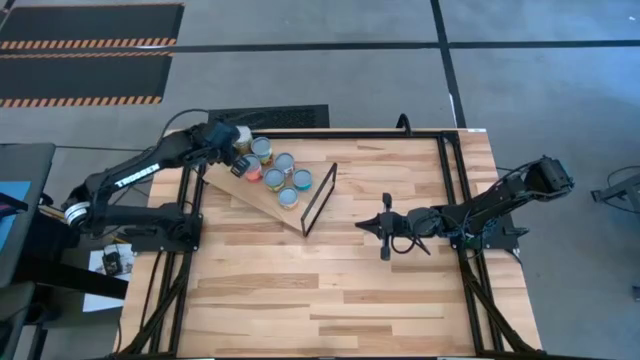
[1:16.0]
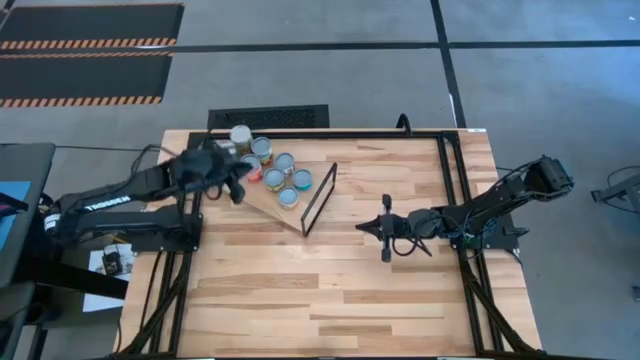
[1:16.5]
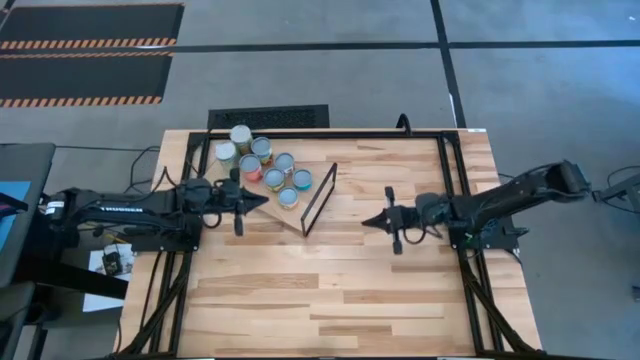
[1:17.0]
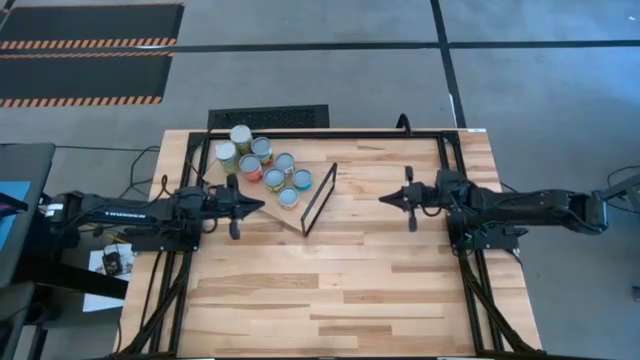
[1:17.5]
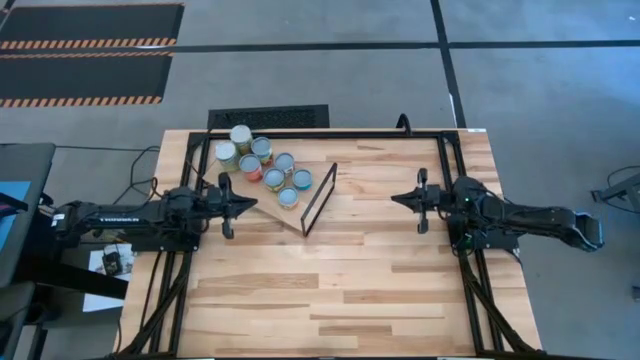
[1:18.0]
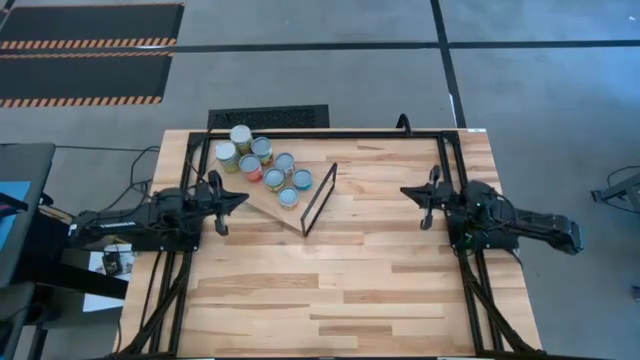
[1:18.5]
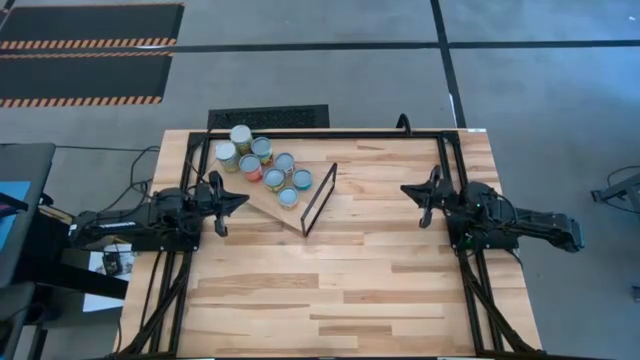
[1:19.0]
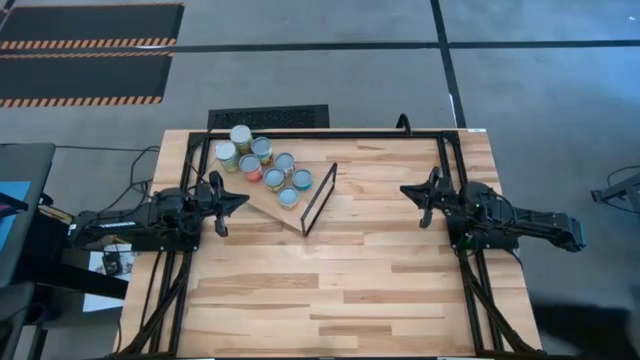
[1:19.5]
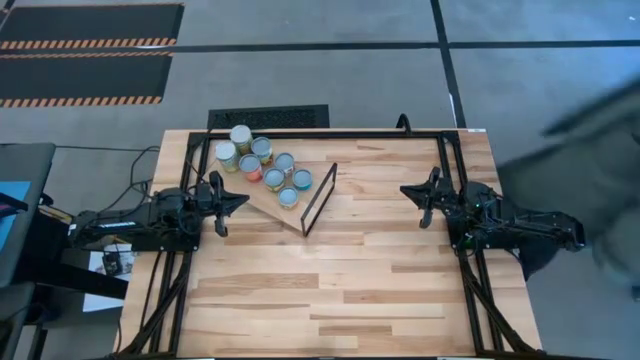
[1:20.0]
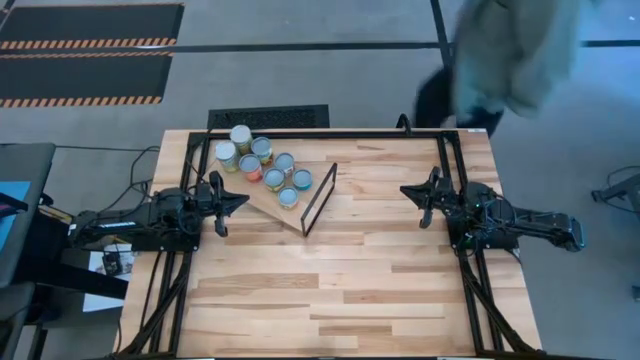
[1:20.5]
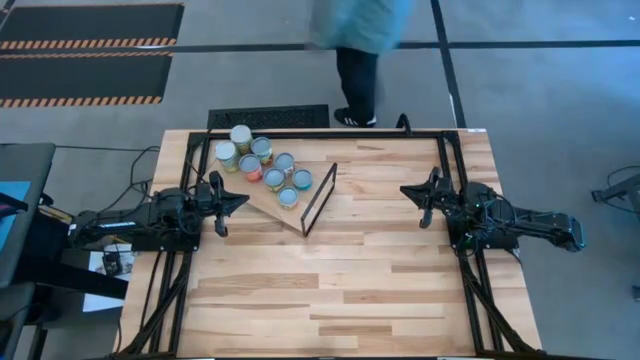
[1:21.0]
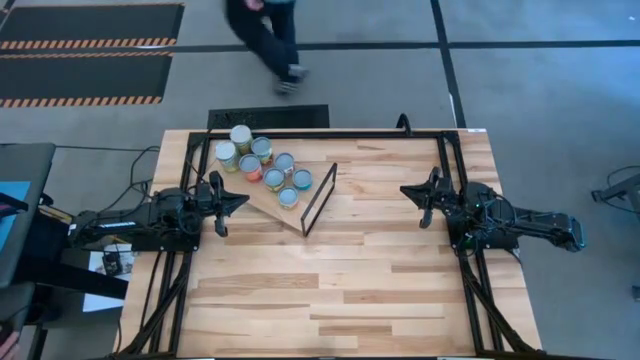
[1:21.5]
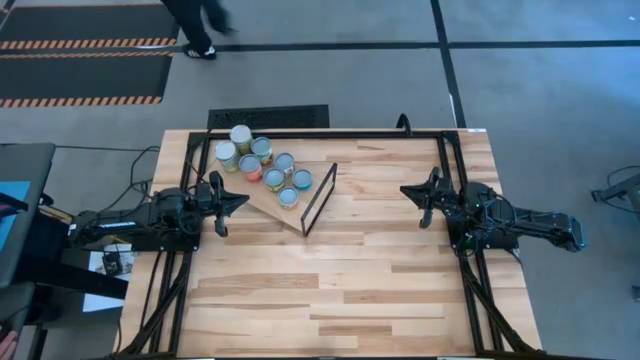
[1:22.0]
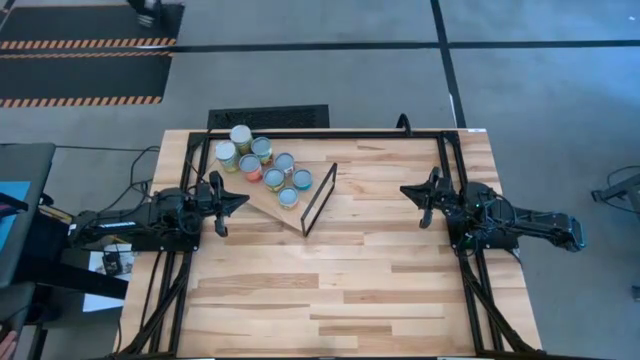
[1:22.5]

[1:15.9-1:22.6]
Task: Pick and place cans onto a shelf
Return to Home Position

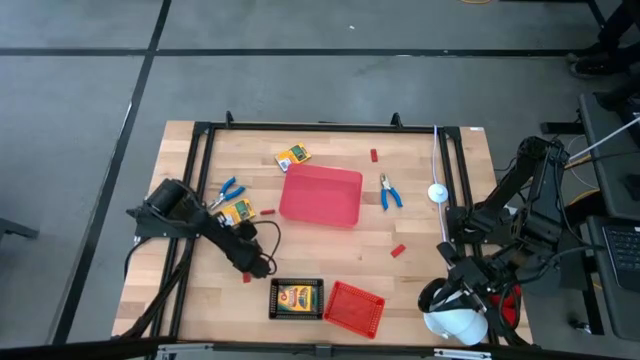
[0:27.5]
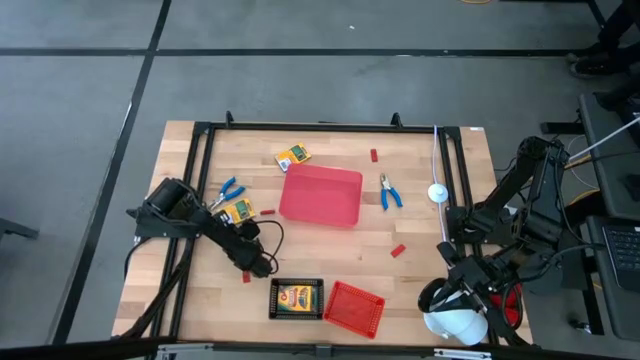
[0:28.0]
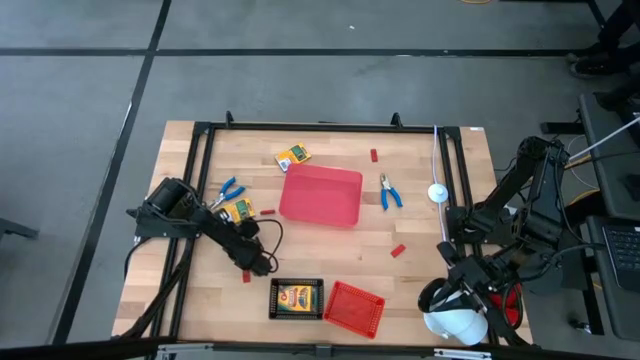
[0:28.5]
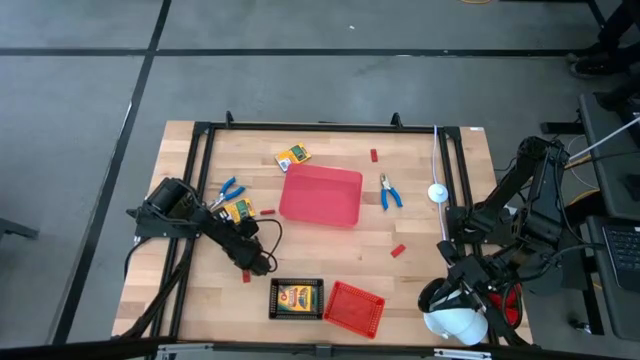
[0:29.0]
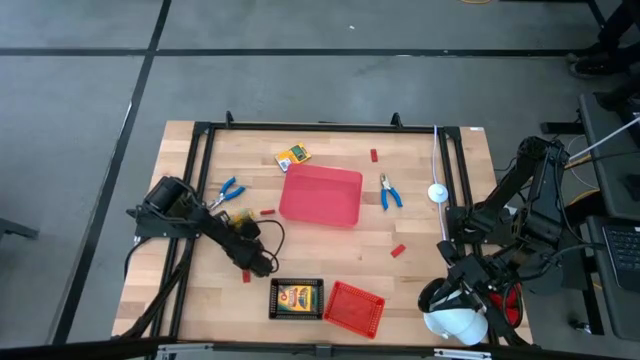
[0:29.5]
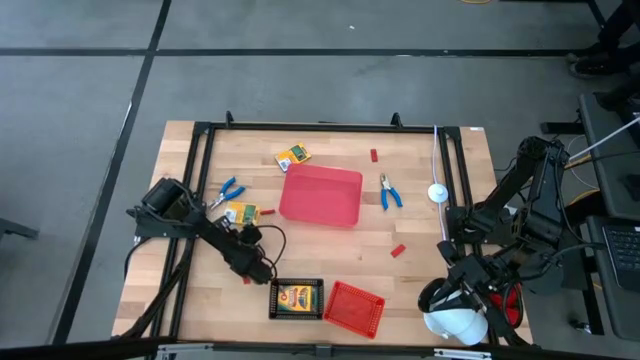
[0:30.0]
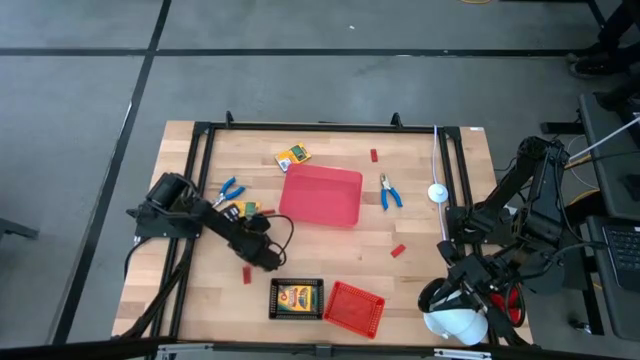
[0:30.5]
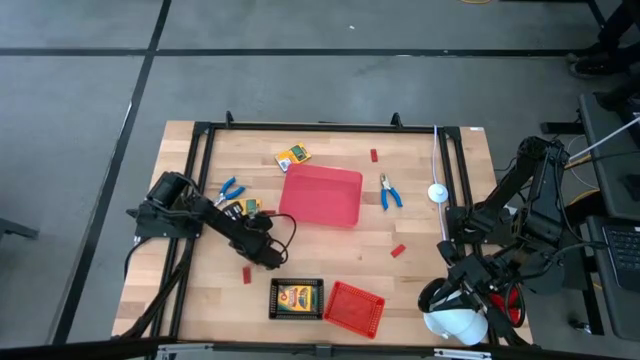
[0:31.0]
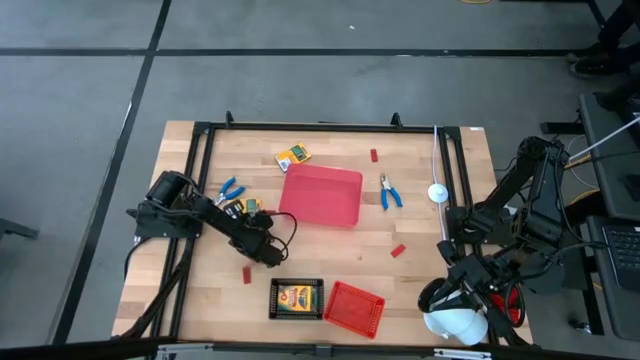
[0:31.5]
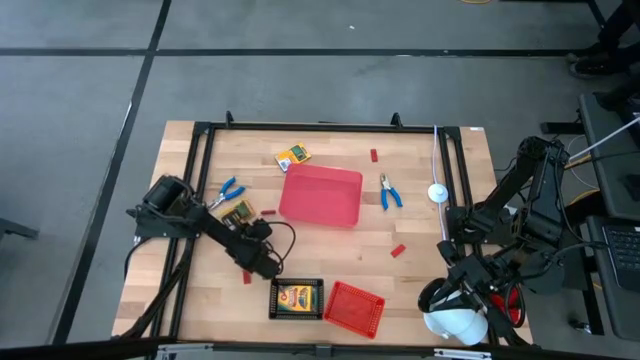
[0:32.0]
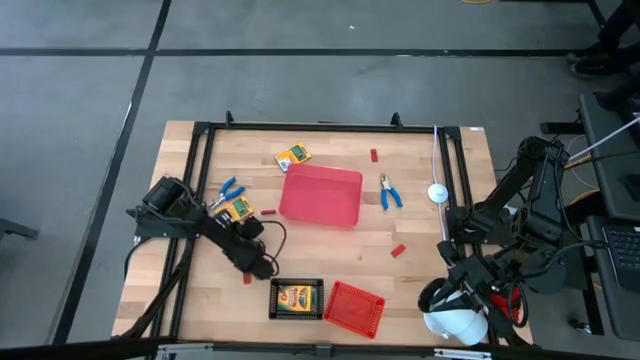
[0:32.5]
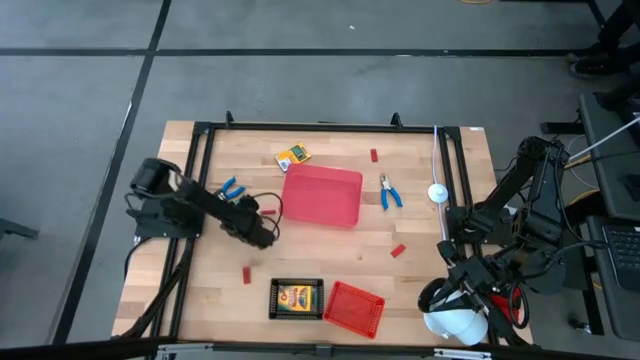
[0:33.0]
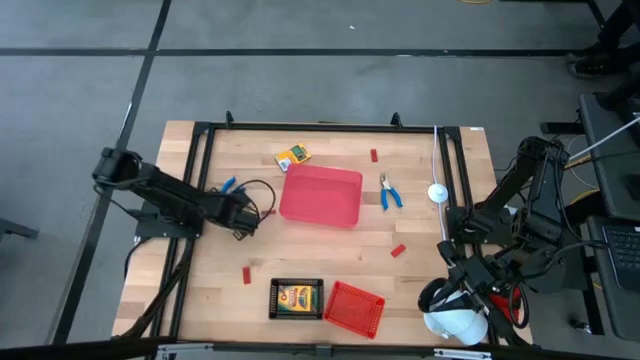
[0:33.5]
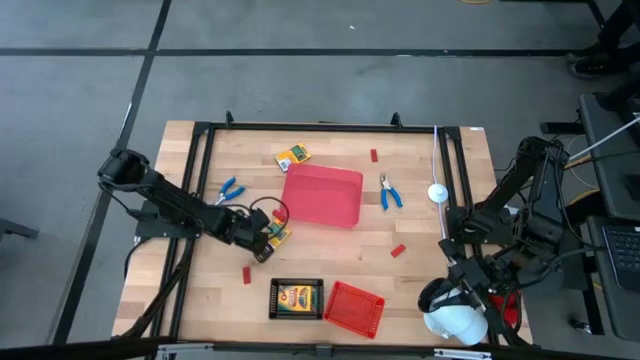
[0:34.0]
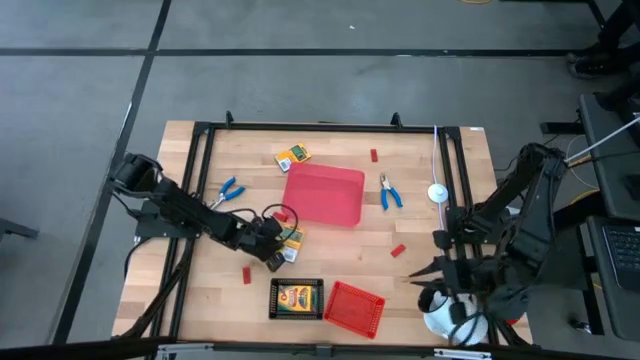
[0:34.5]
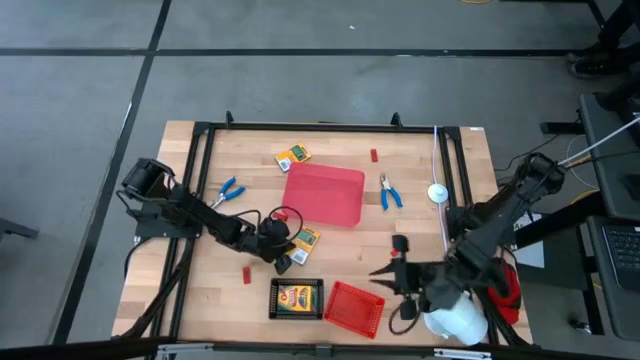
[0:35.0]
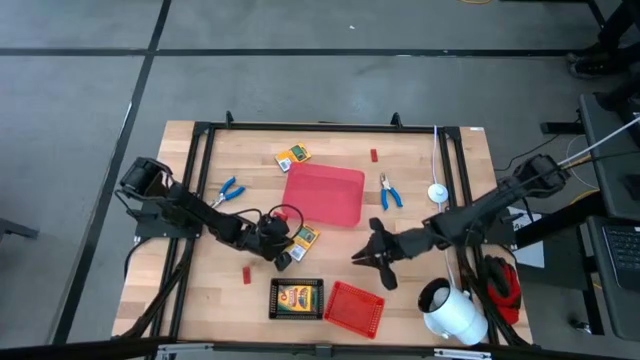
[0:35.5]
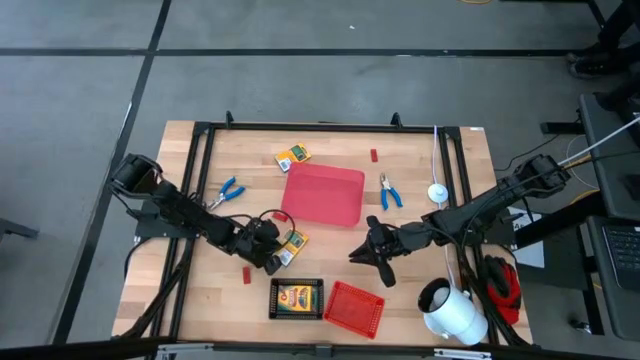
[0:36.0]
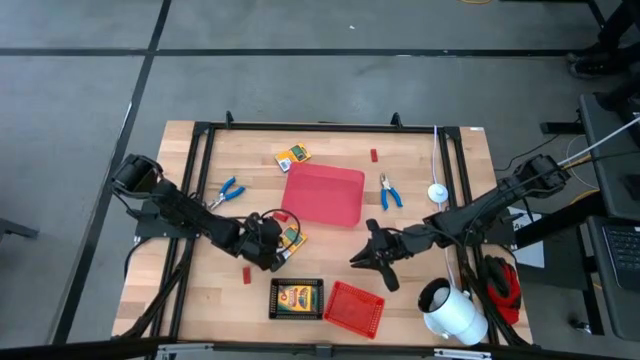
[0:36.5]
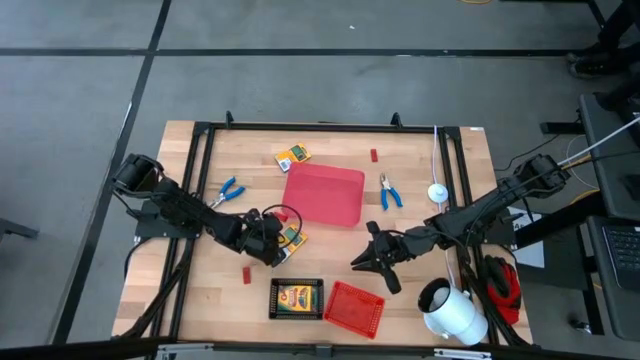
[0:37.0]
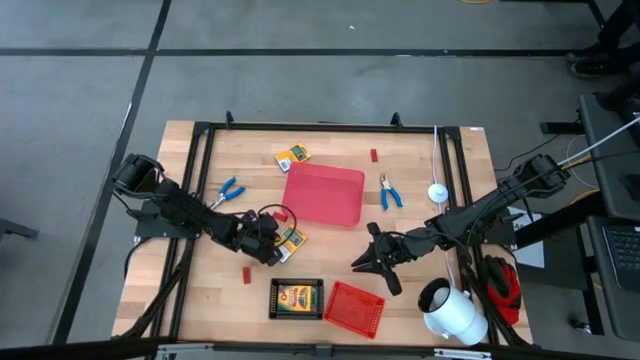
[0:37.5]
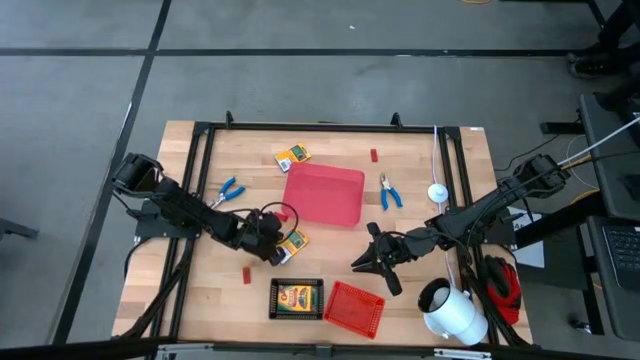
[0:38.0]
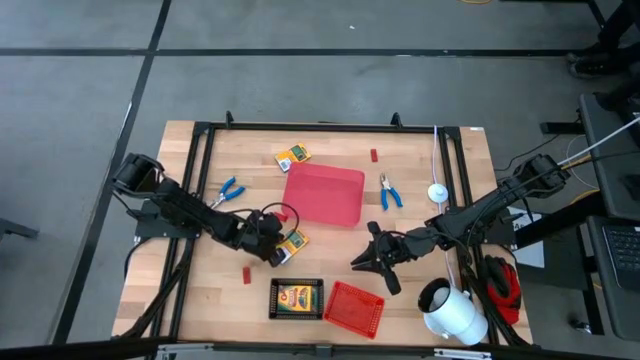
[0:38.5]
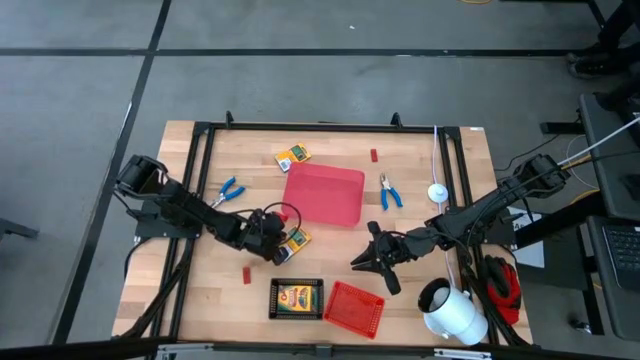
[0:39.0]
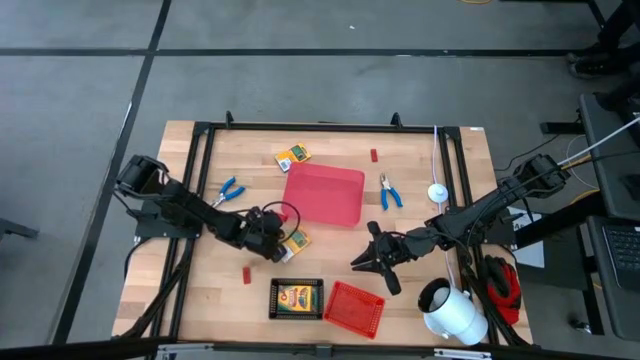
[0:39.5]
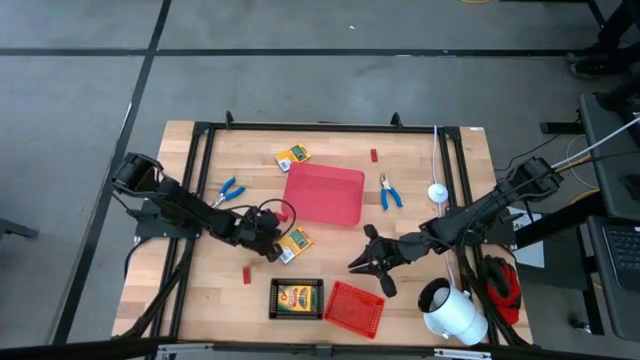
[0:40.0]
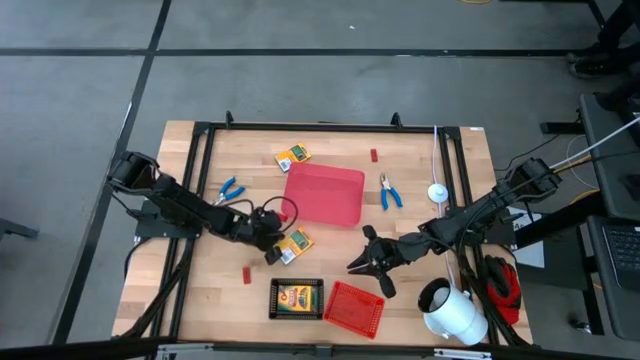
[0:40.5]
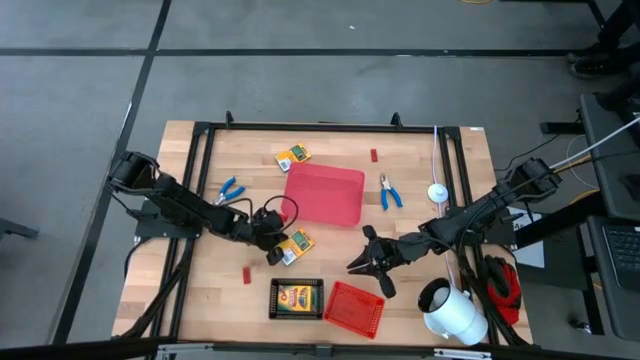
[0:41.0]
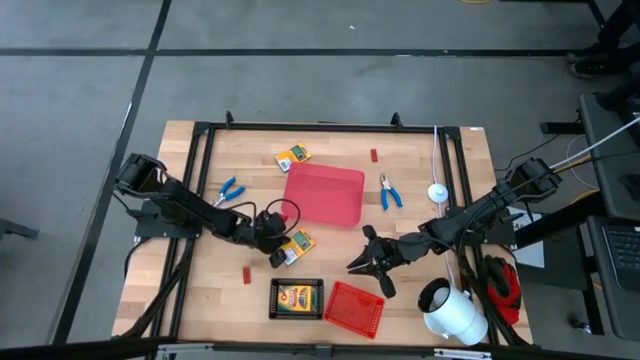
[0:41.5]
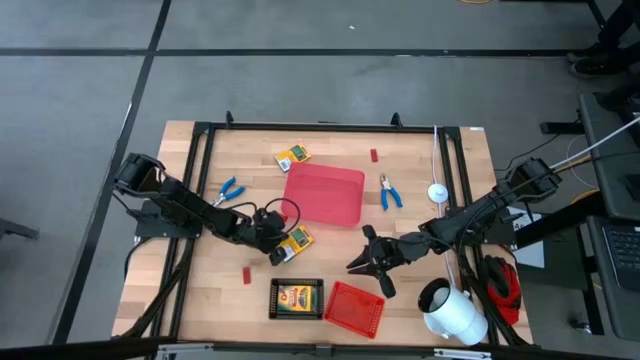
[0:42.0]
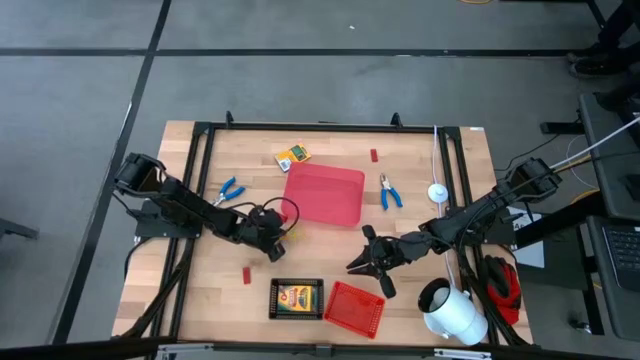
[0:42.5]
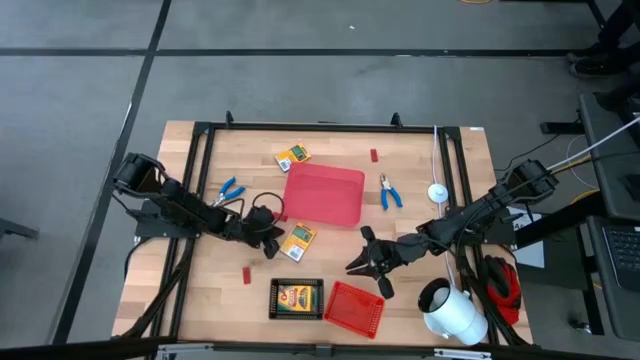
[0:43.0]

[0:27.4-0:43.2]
Task: Pick & Place School Supplies
Put the crayon box into the black bin
